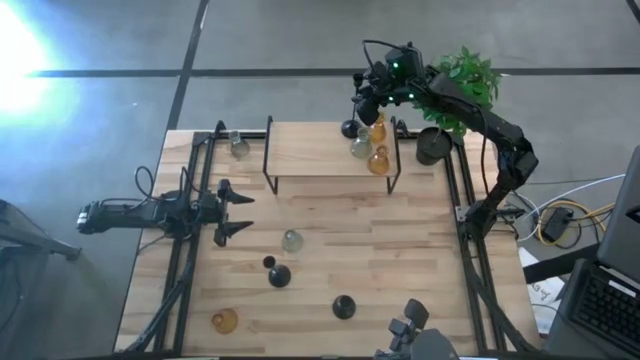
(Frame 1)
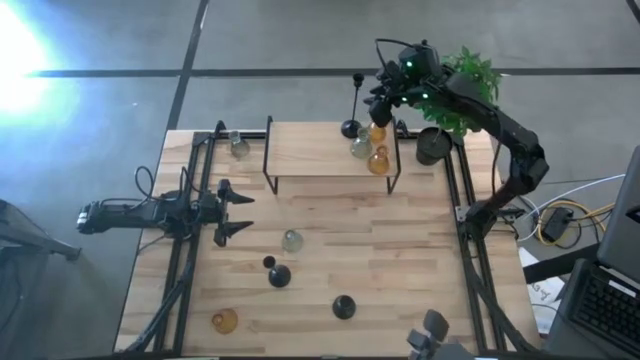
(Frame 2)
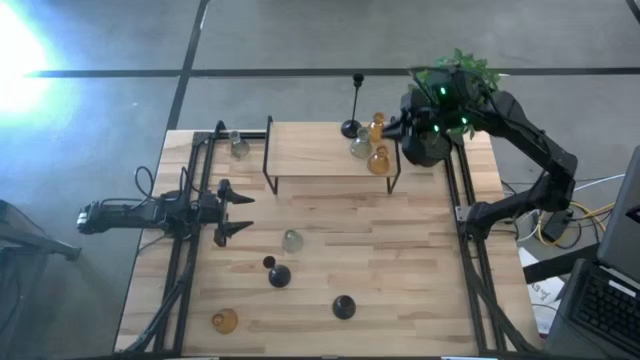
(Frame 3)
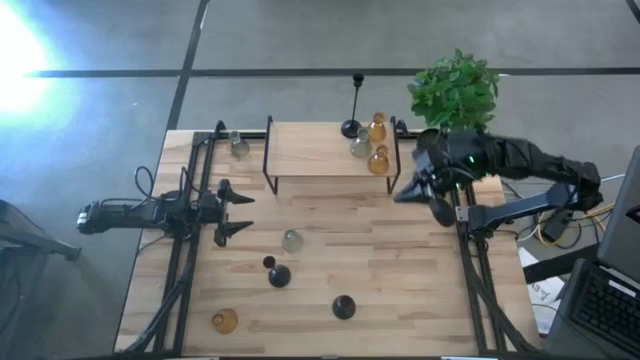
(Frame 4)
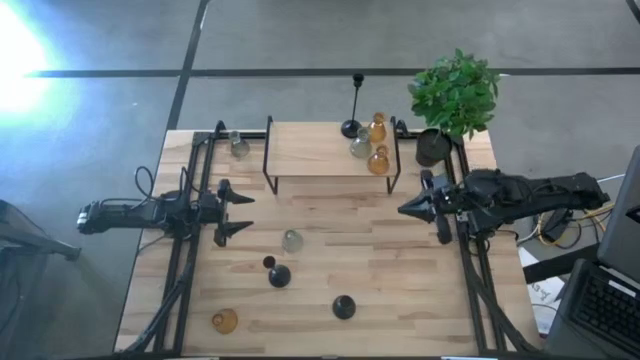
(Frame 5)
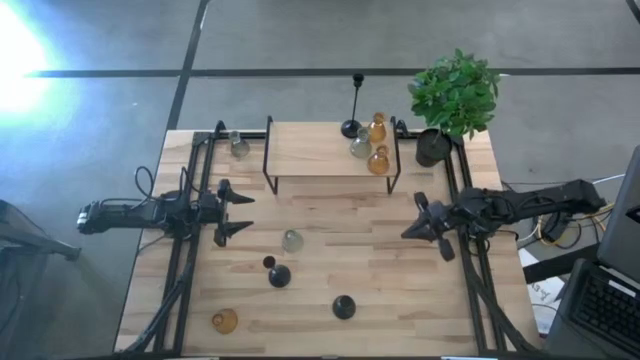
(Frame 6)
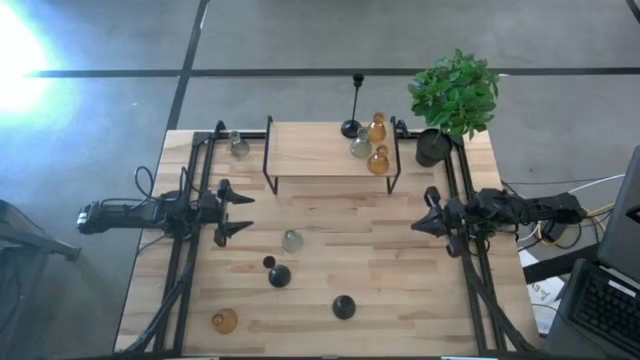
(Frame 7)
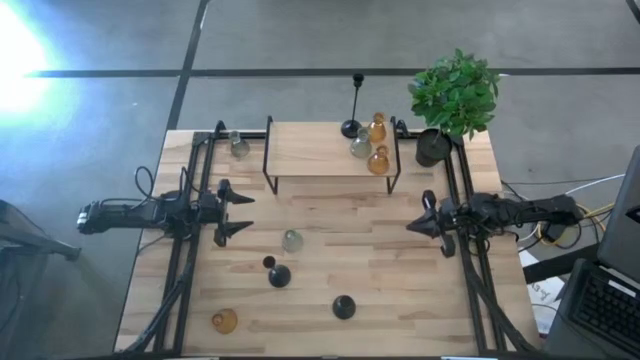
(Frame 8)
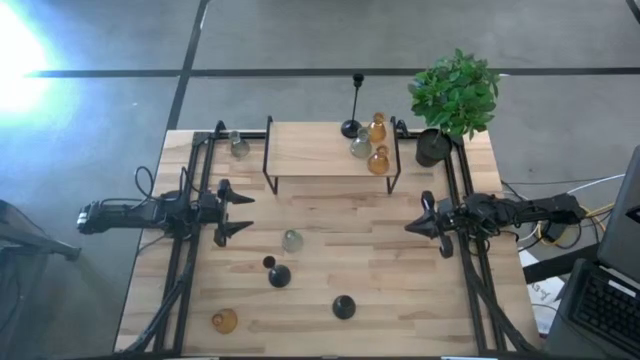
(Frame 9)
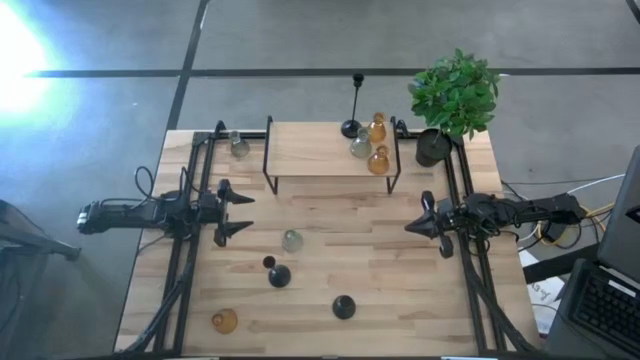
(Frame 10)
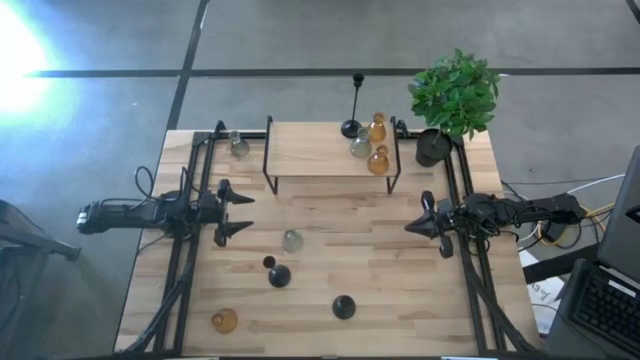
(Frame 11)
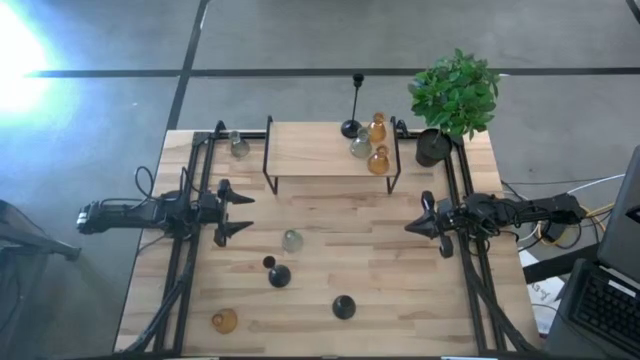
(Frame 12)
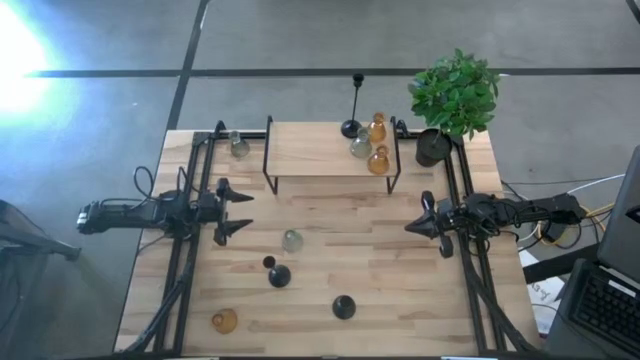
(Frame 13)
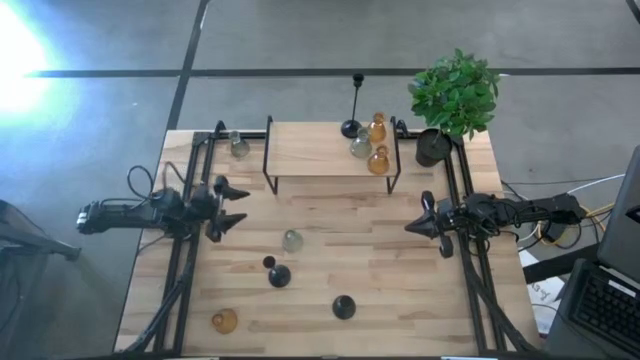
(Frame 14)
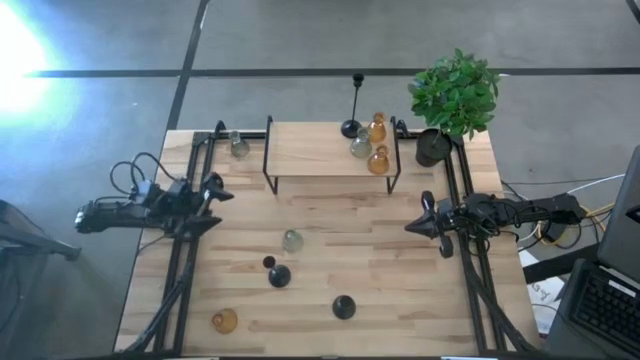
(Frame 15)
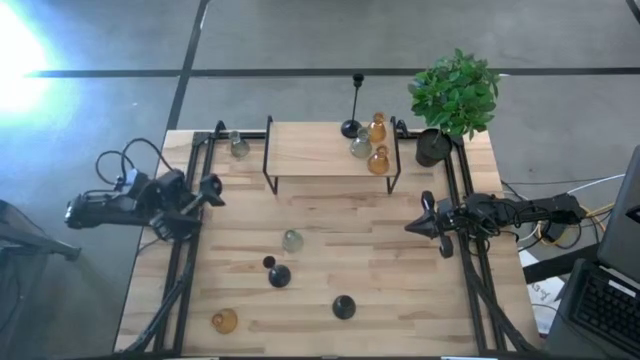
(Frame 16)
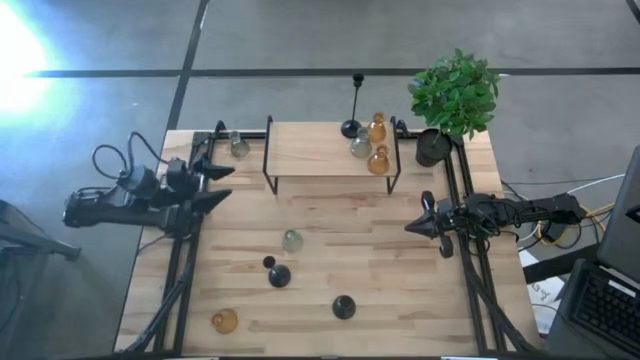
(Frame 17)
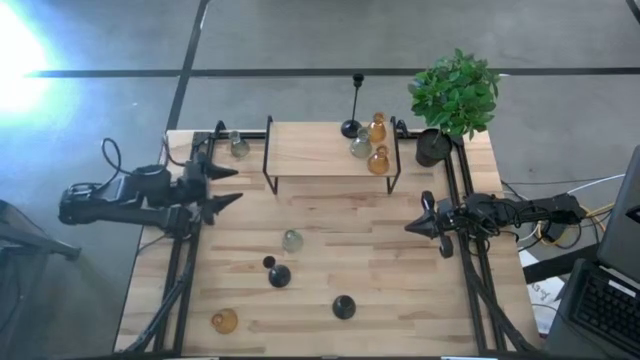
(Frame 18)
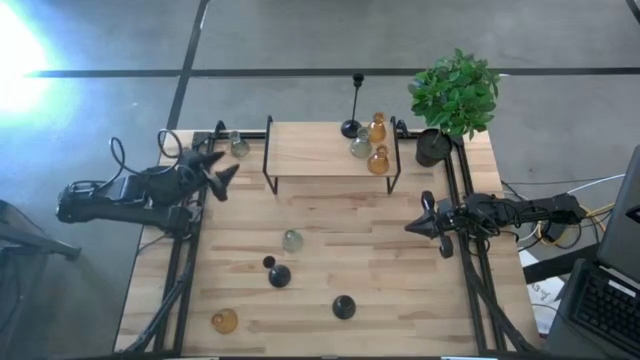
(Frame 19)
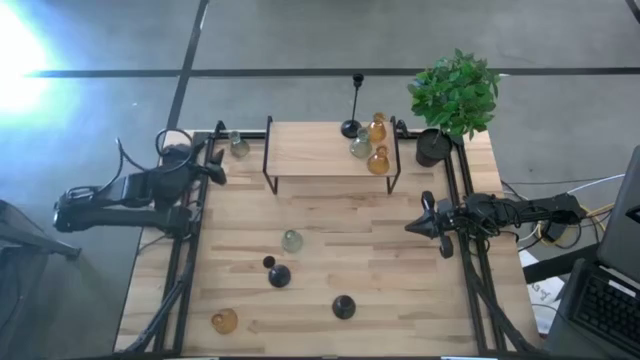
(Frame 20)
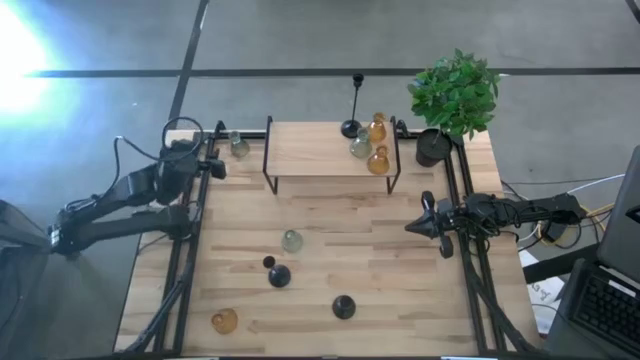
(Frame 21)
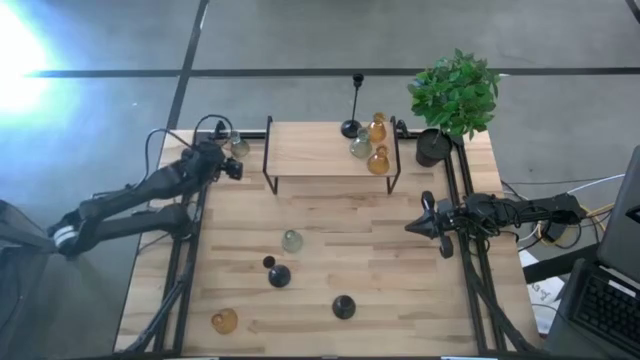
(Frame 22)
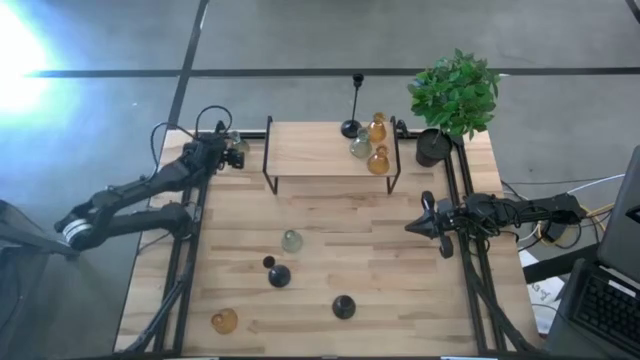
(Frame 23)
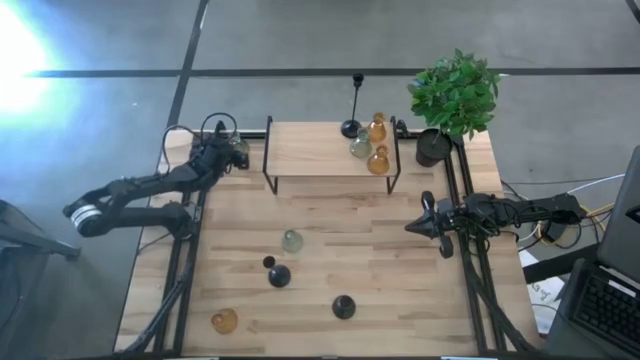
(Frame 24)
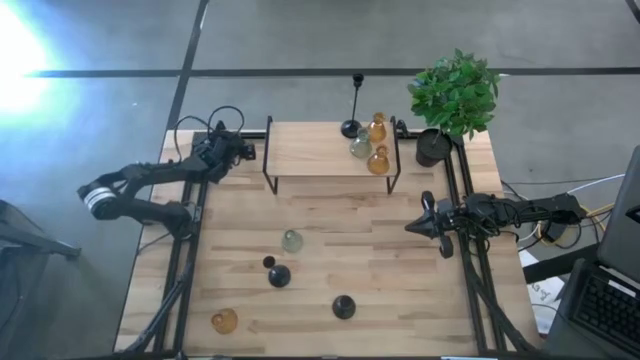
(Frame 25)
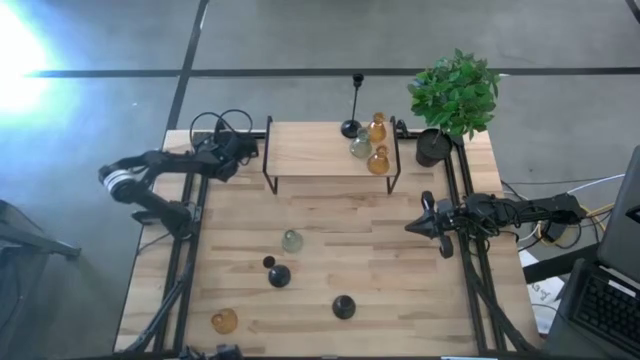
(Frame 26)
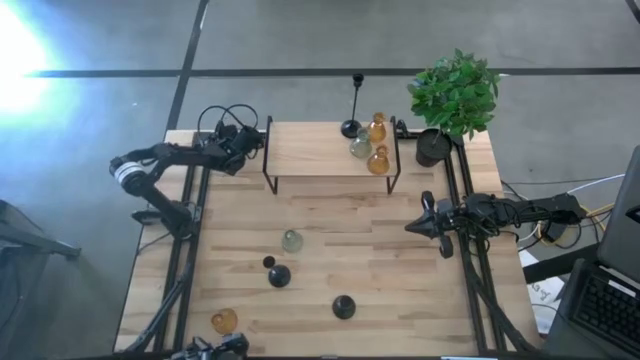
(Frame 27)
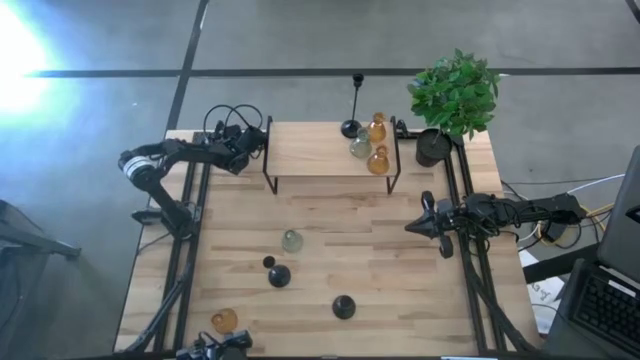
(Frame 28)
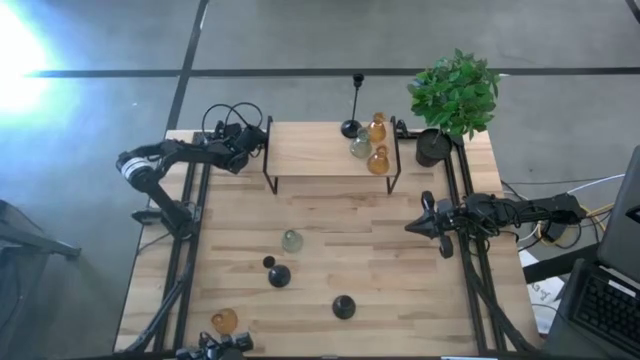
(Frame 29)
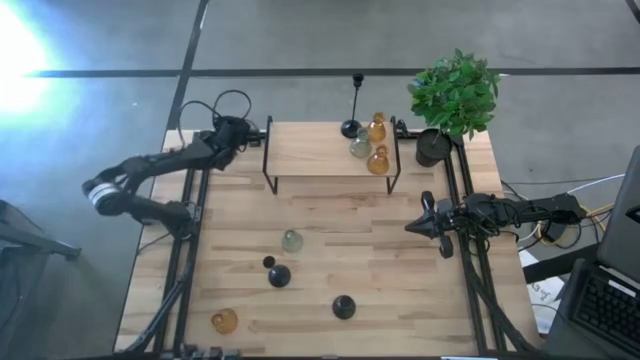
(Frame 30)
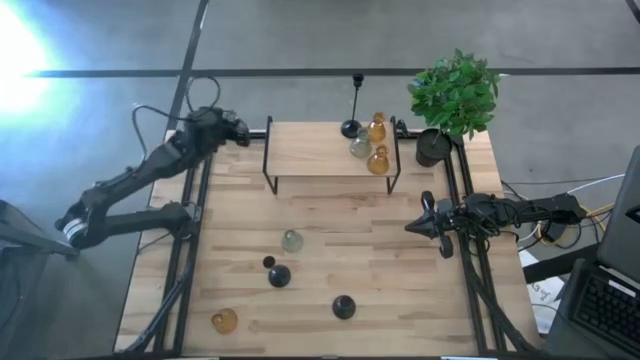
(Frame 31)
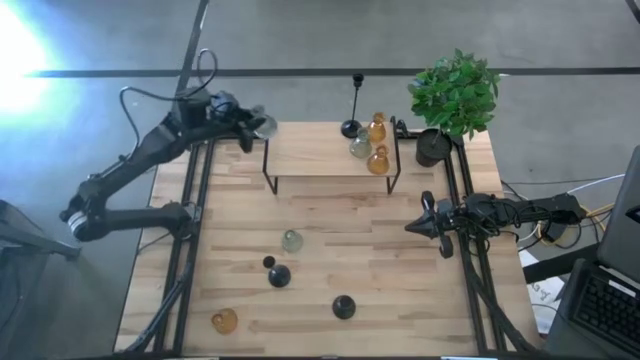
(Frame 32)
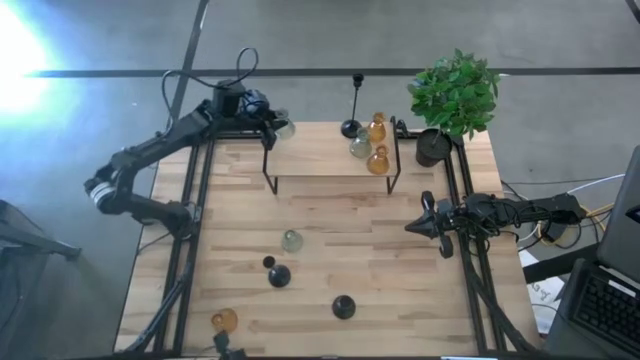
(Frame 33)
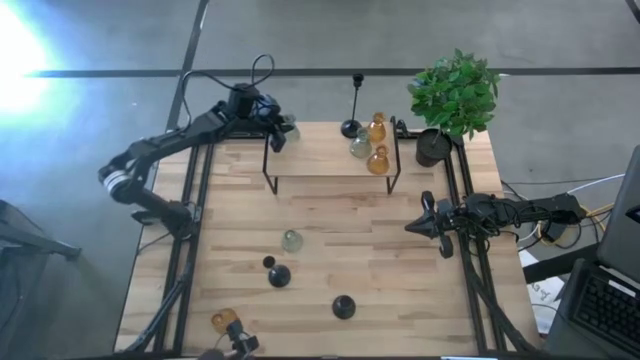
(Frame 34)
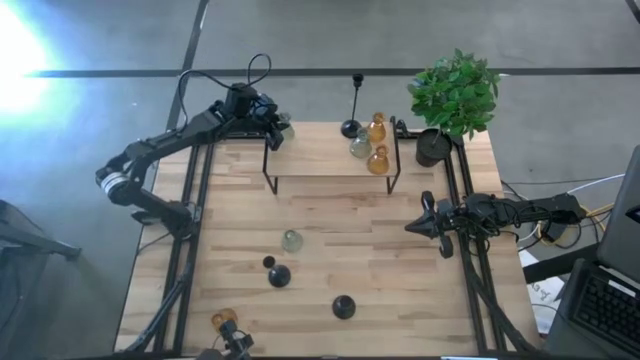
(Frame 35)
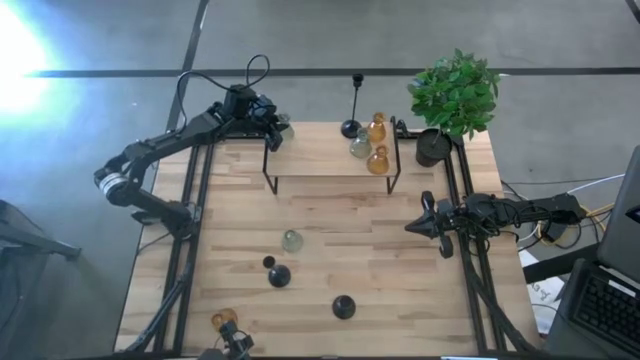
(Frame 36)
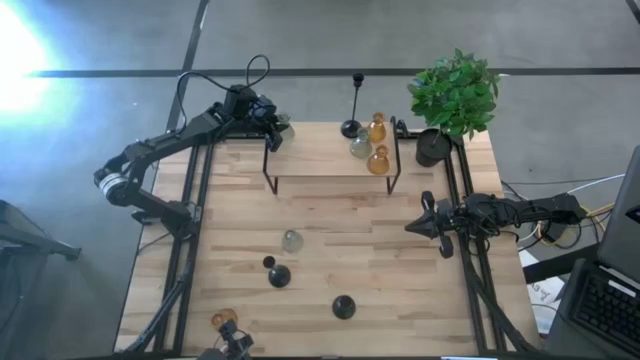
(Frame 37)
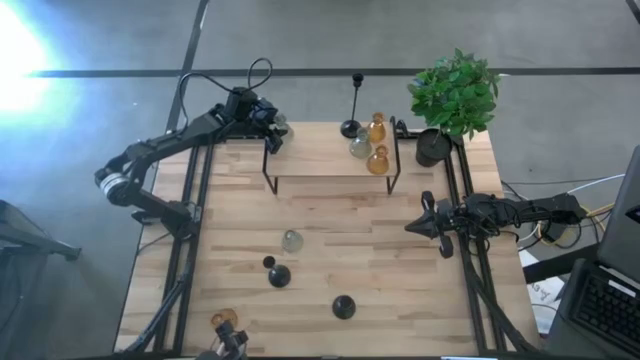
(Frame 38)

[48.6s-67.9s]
Task: Pick & Place candle stick holders
Put the top green candle holder on the shelf
